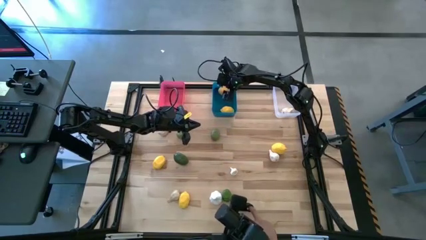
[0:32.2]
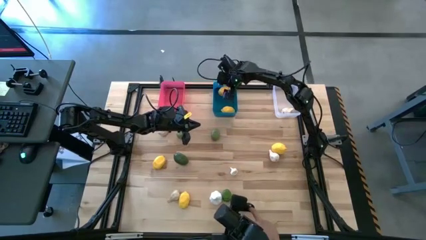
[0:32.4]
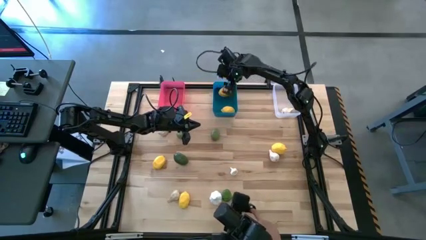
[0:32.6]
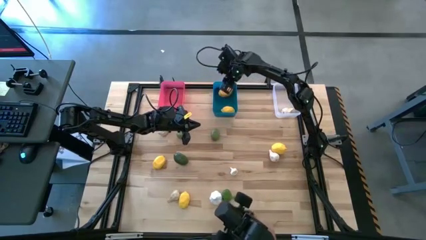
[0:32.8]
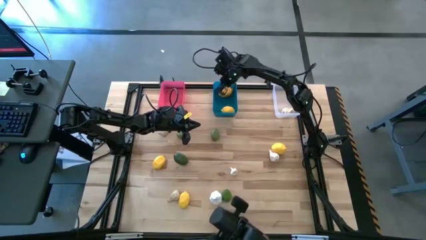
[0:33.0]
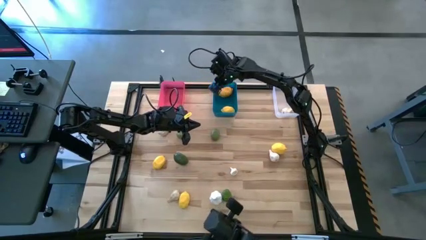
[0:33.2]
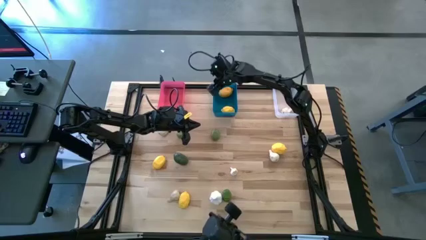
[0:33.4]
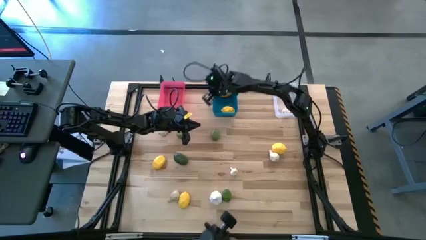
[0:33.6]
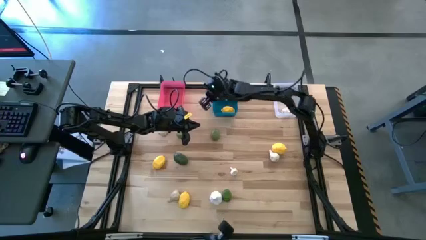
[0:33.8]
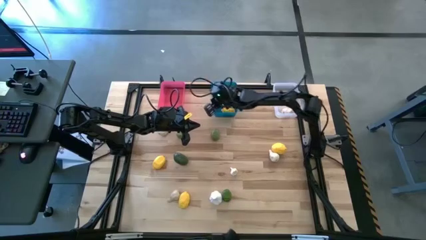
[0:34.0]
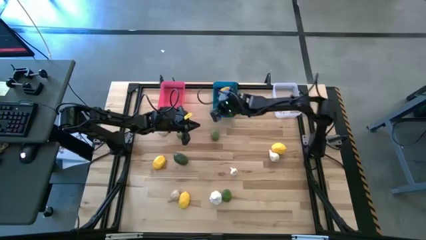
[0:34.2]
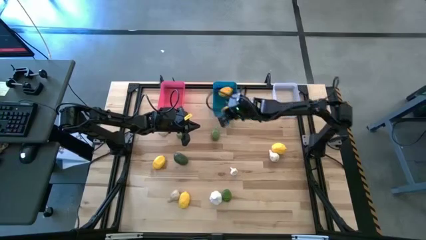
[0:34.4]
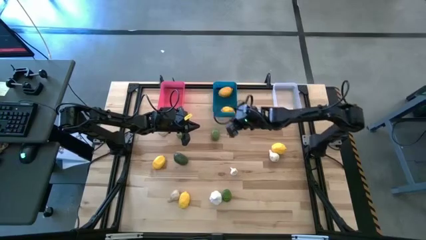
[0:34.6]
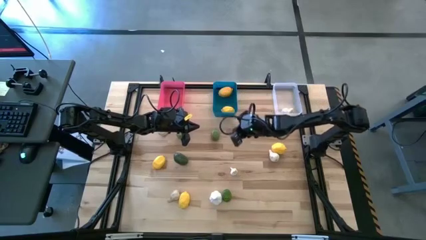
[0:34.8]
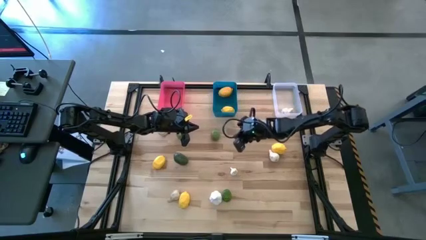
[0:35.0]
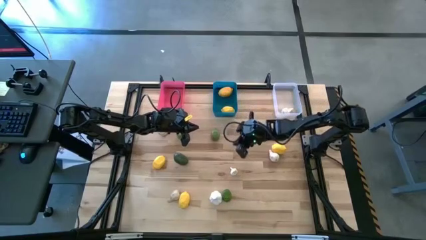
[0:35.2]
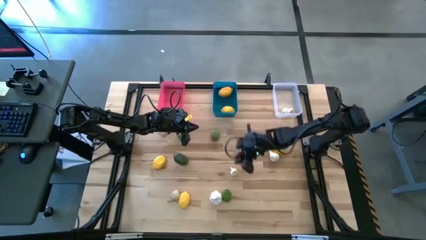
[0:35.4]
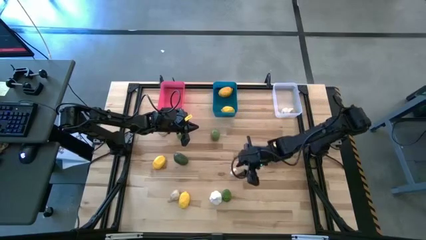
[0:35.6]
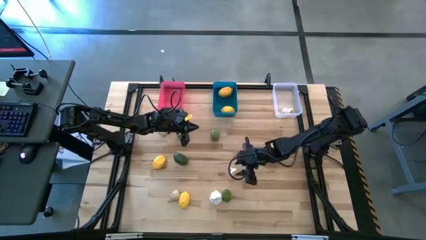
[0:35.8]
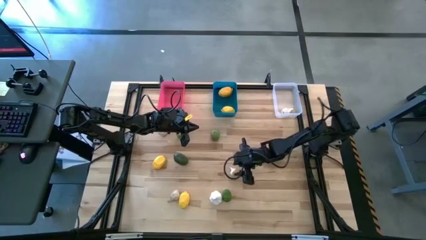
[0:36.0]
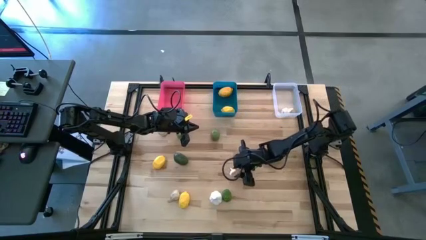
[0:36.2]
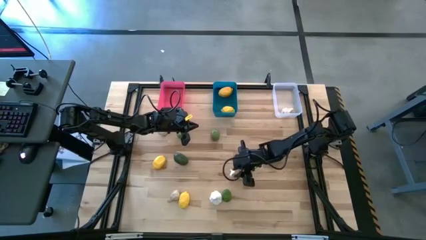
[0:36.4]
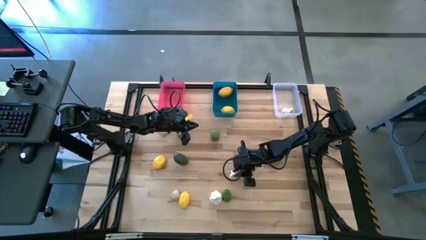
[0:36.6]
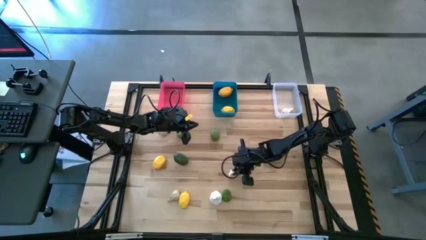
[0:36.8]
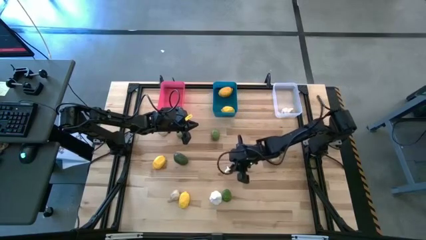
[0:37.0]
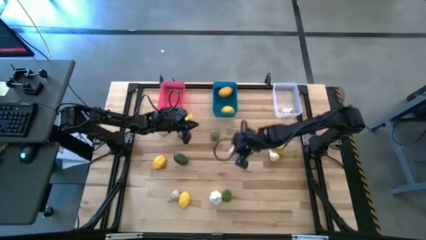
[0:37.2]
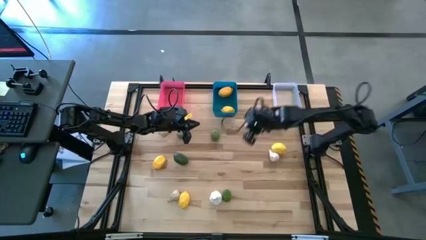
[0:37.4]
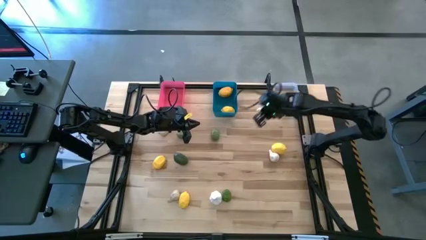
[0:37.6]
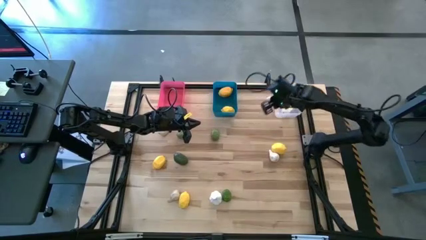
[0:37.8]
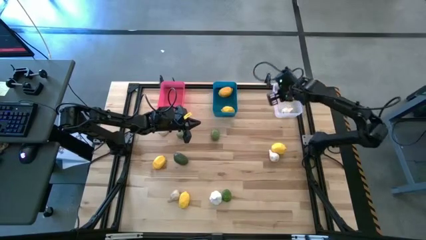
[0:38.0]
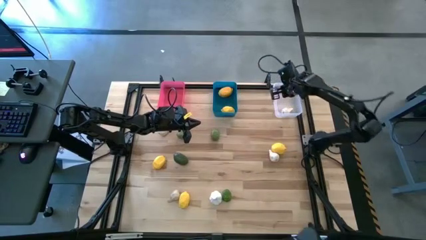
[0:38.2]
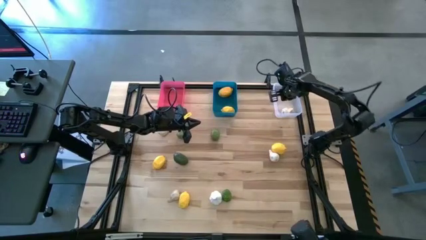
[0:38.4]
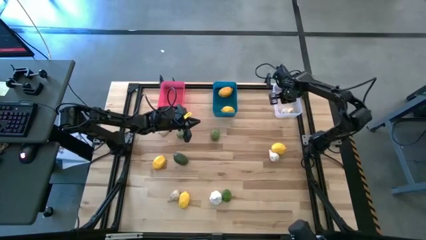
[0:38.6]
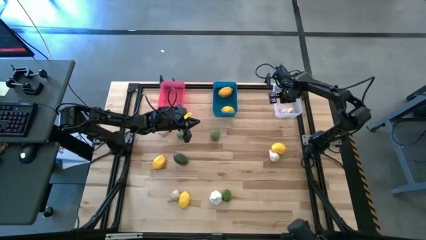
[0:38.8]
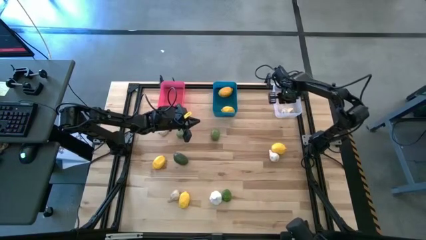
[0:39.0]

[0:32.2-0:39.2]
Task: Sort produce into baskets
Put the garlic into the white bin

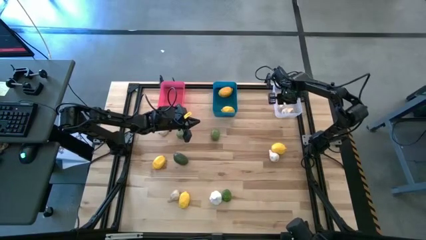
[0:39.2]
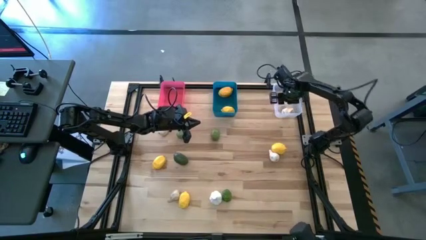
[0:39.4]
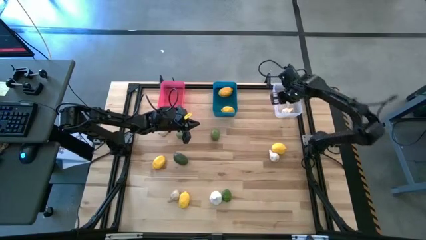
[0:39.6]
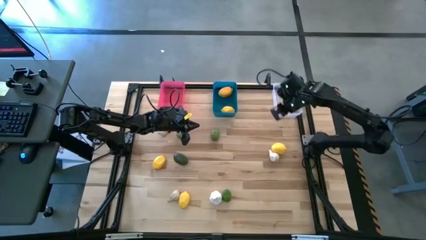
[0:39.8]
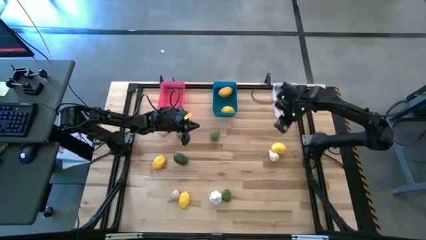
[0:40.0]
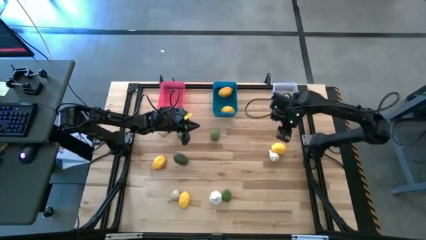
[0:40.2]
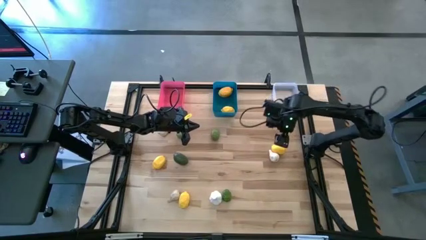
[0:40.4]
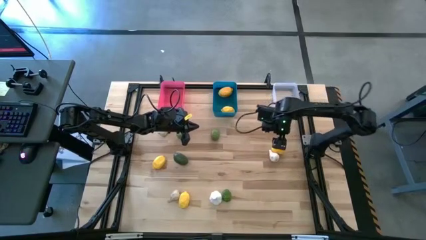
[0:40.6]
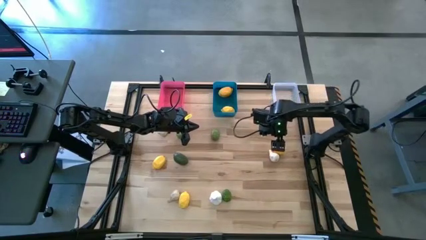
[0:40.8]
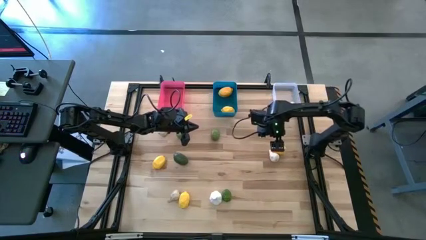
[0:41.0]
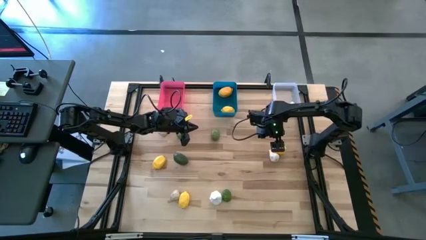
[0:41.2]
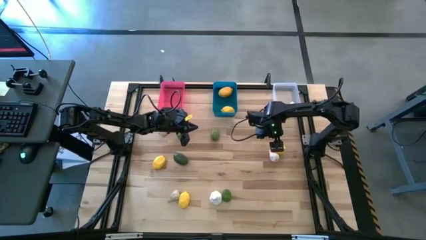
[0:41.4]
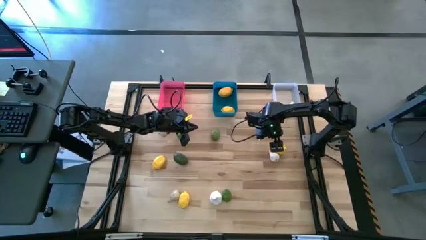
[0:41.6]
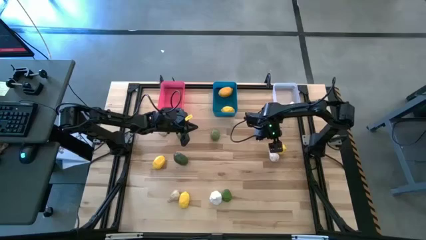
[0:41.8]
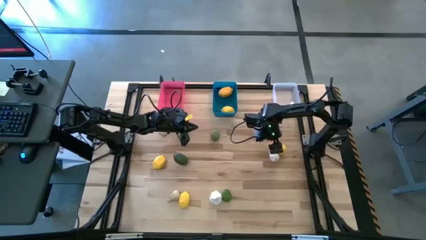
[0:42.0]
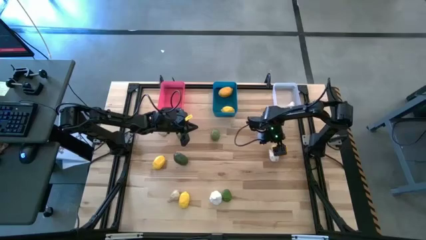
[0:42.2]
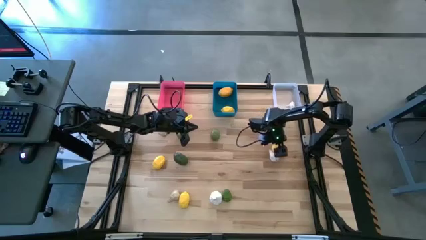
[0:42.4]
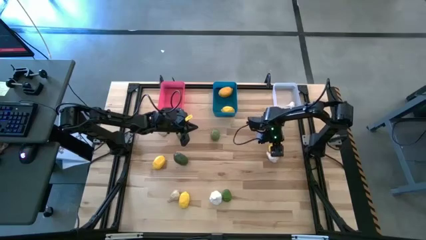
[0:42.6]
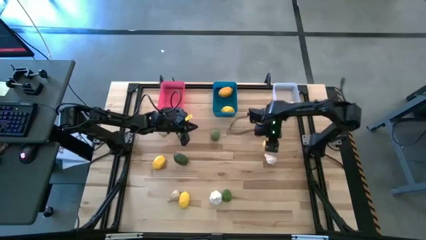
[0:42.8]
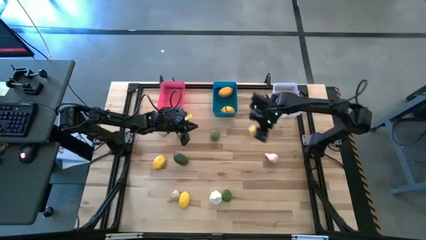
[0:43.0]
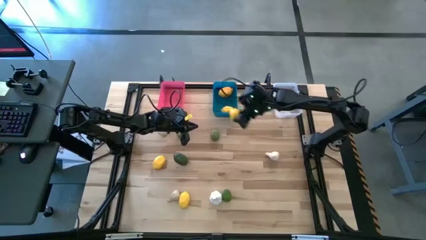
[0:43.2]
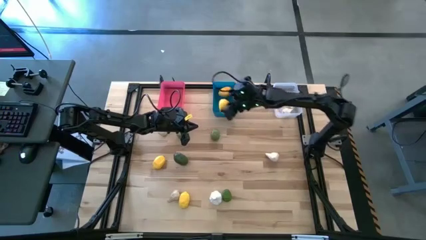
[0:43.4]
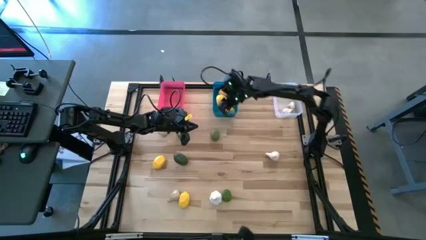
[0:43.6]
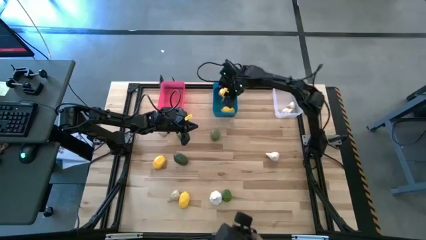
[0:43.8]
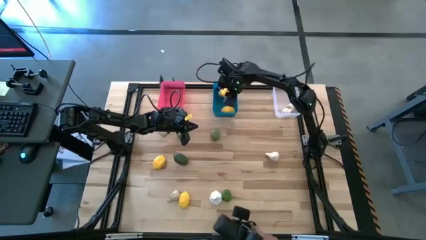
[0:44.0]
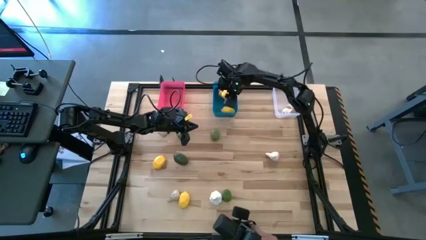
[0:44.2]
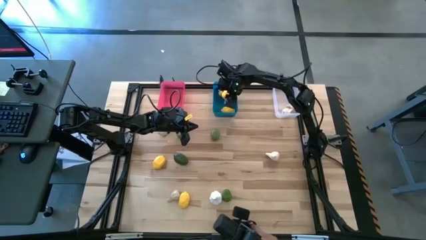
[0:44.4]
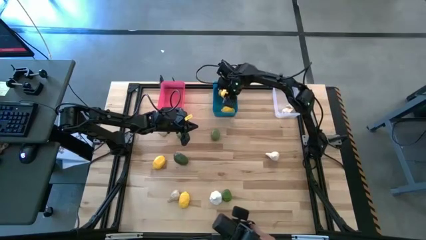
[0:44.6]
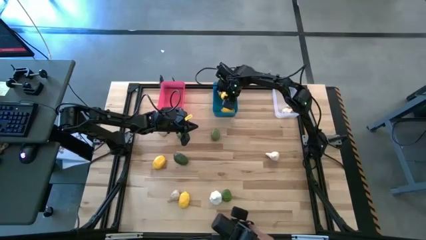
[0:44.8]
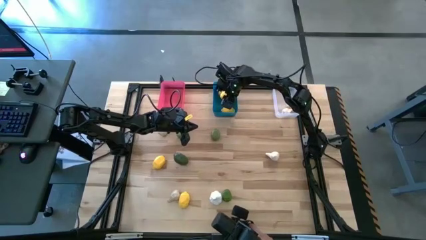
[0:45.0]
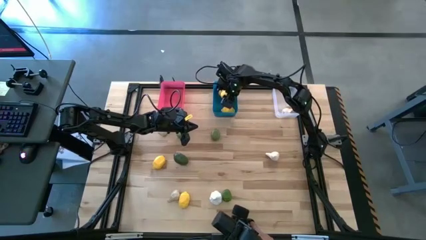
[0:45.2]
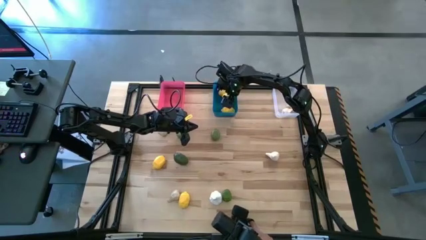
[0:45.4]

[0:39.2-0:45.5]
Put the lemon into the blue bin

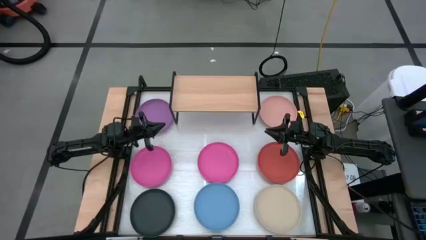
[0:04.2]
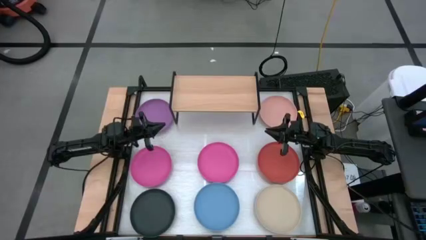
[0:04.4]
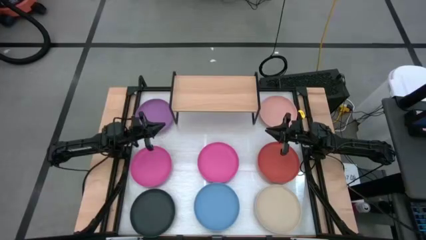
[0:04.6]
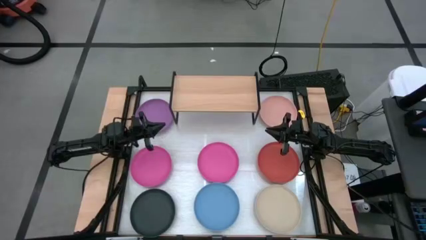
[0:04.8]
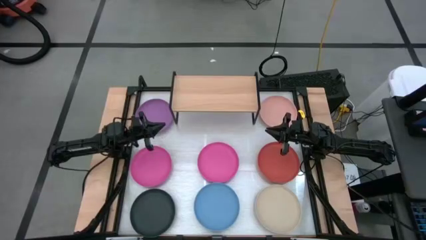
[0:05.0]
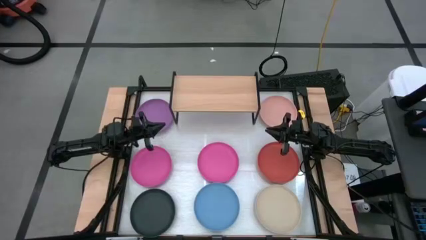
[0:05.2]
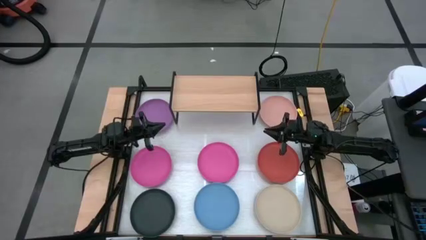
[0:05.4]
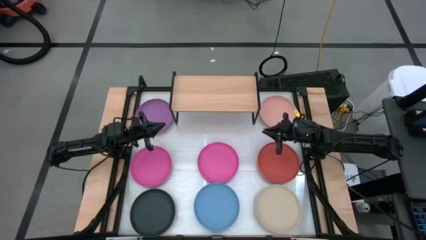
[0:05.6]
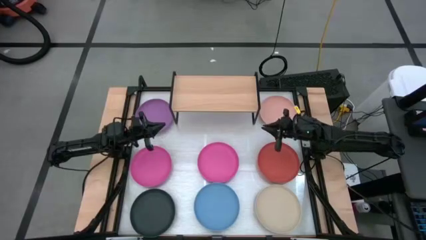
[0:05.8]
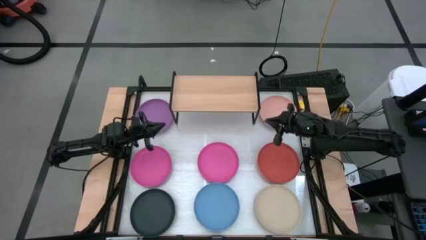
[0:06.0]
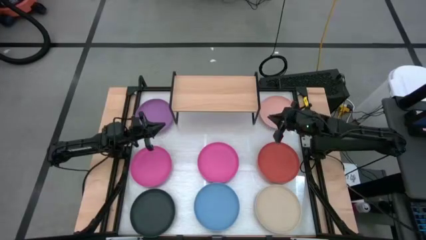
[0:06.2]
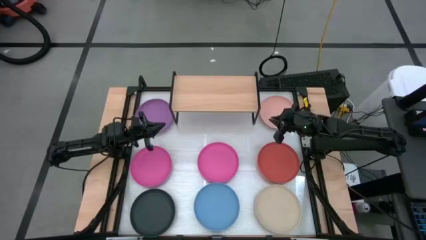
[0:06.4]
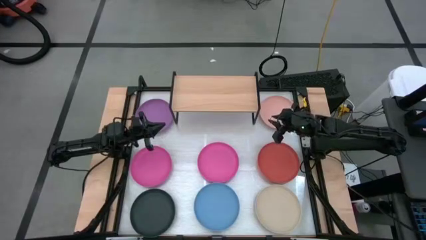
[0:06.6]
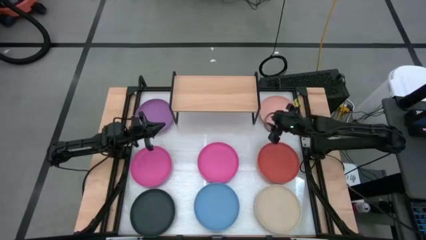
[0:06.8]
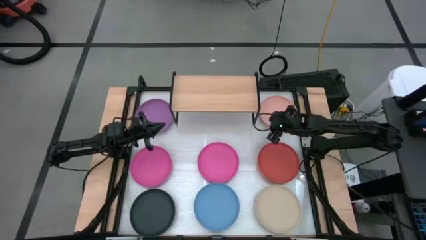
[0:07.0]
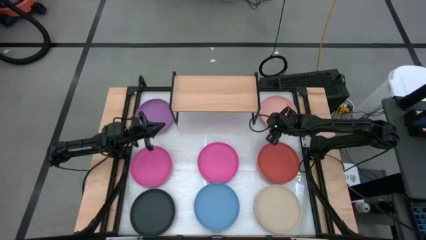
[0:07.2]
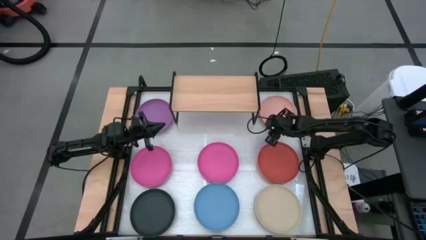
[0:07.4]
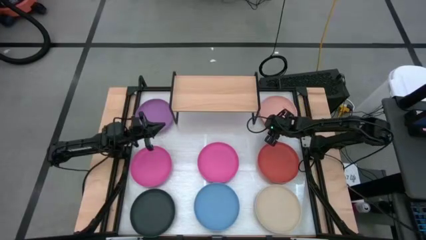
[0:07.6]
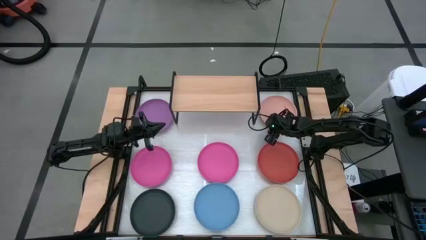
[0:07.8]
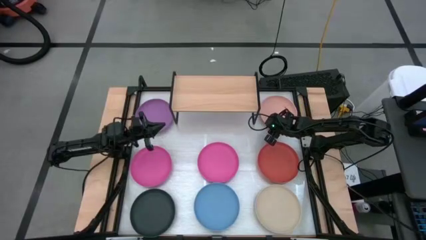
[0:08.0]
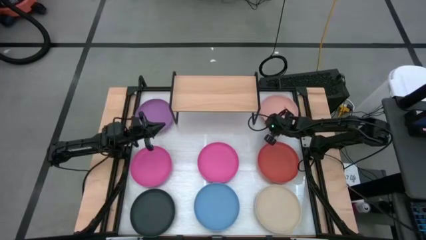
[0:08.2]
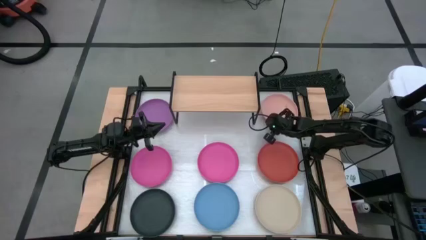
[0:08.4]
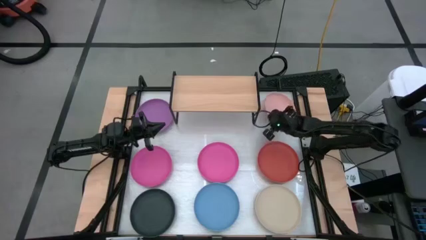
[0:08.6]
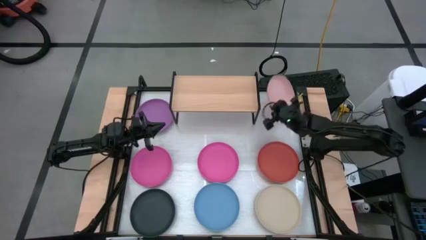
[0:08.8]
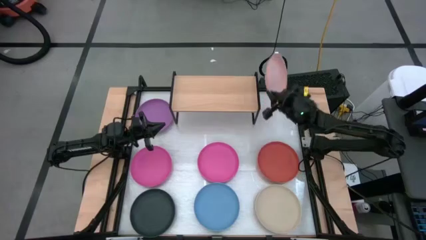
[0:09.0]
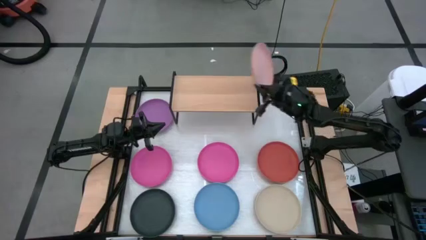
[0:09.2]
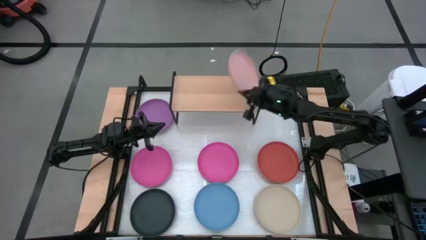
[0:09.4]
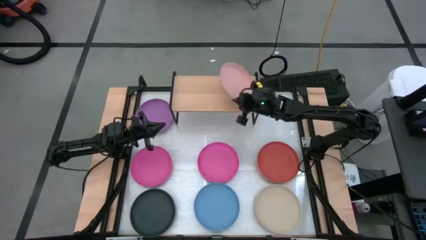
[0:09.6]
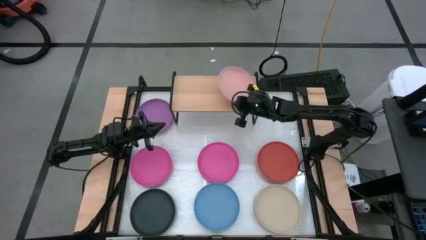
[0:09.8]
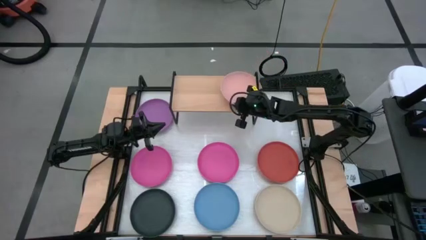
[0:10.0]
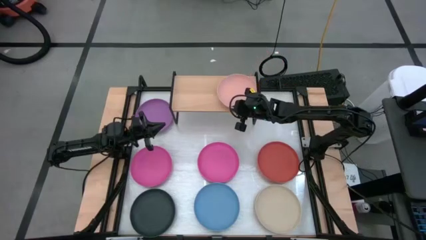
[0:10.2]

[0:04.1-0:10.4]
Task: Place and stack plates onto a shelf
Put the light pink plate on the shelf
